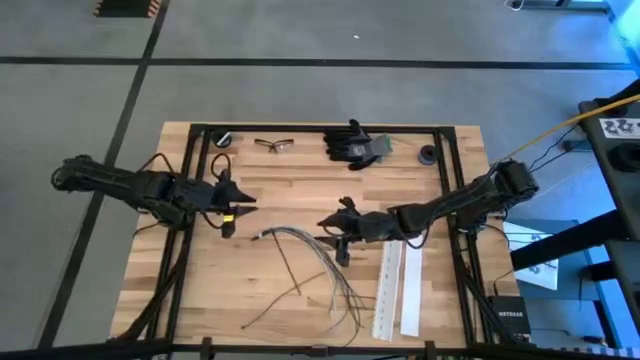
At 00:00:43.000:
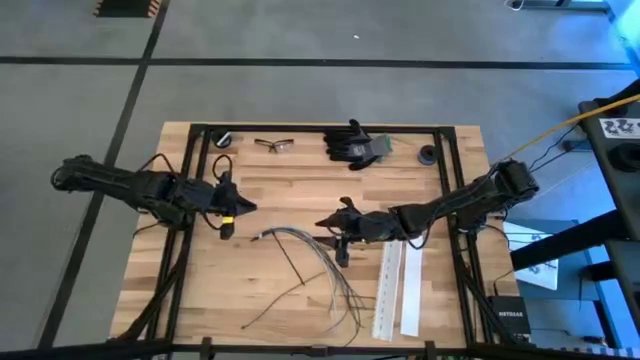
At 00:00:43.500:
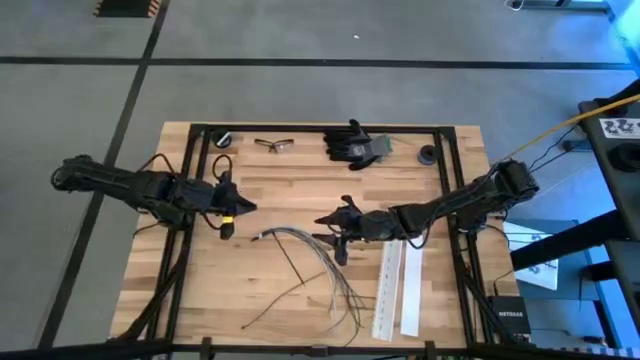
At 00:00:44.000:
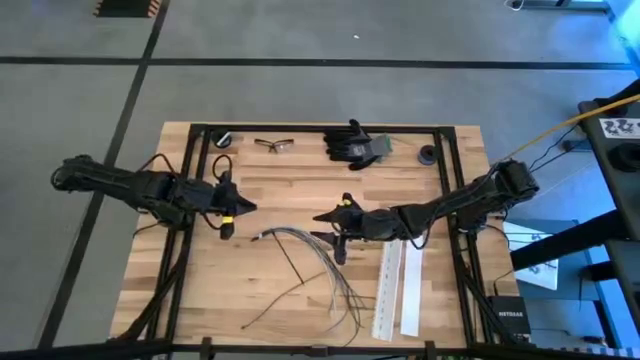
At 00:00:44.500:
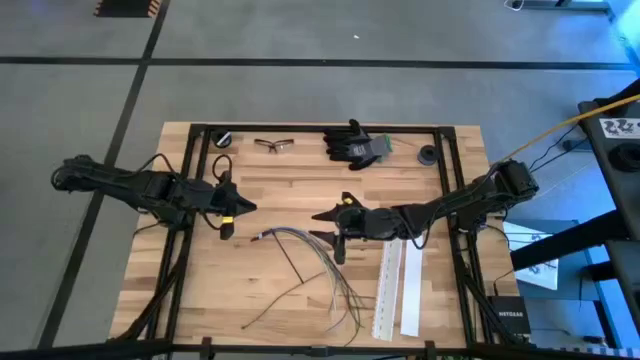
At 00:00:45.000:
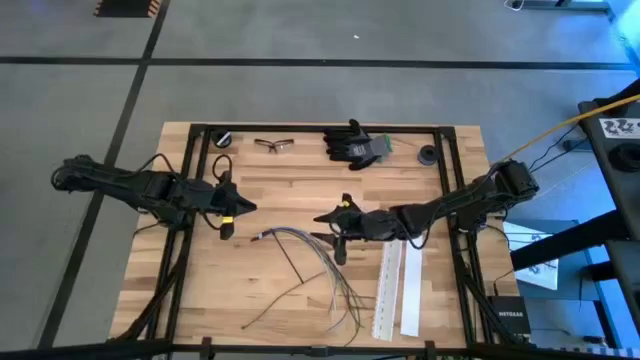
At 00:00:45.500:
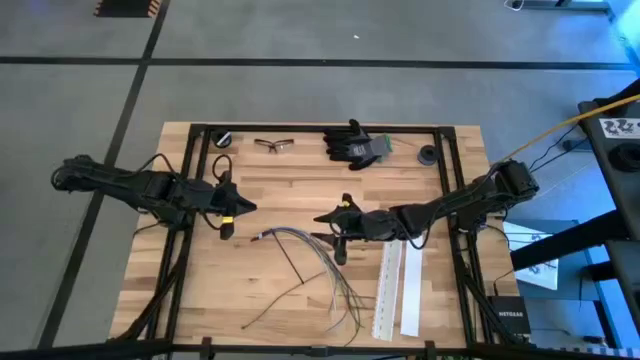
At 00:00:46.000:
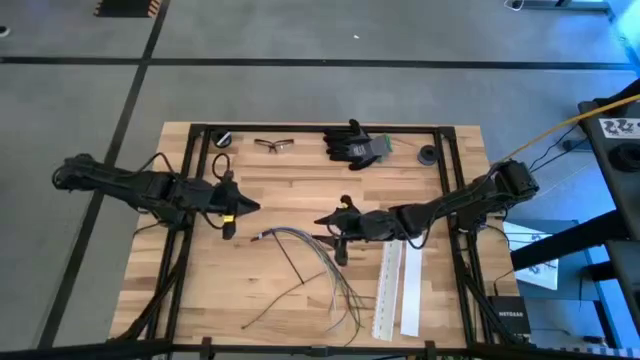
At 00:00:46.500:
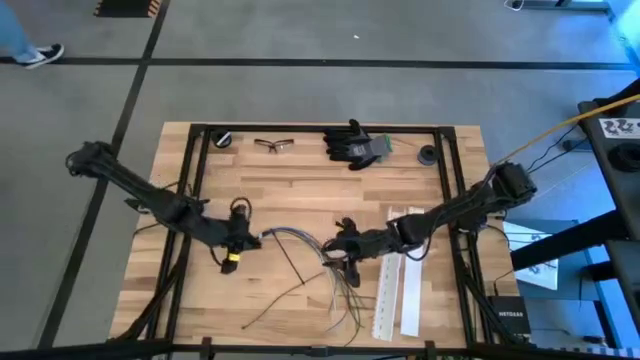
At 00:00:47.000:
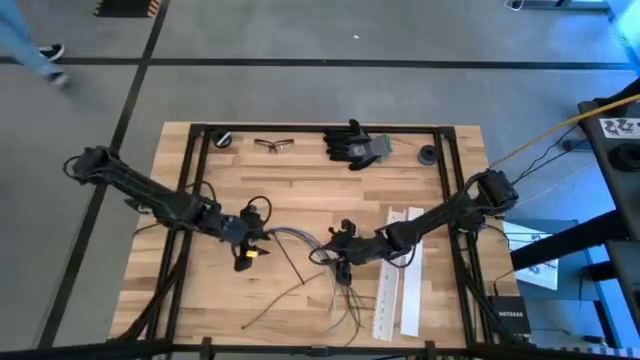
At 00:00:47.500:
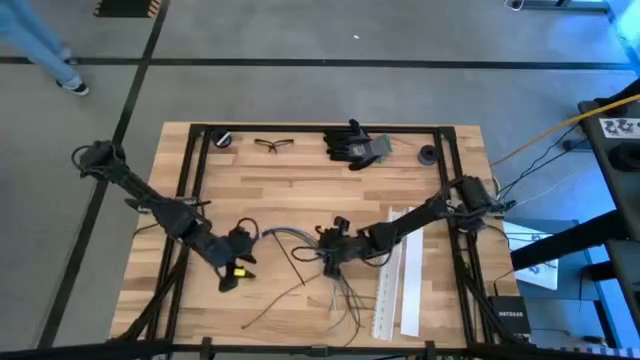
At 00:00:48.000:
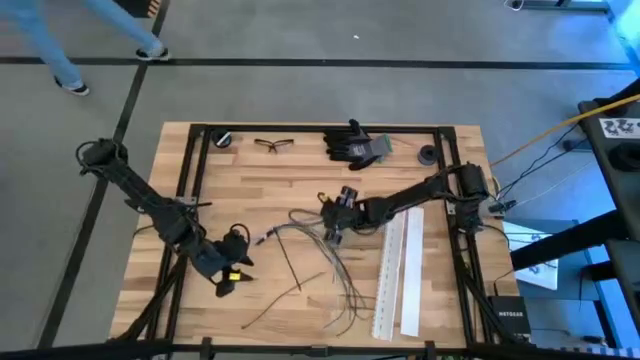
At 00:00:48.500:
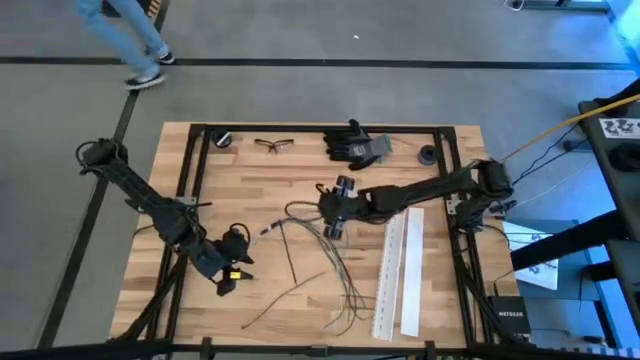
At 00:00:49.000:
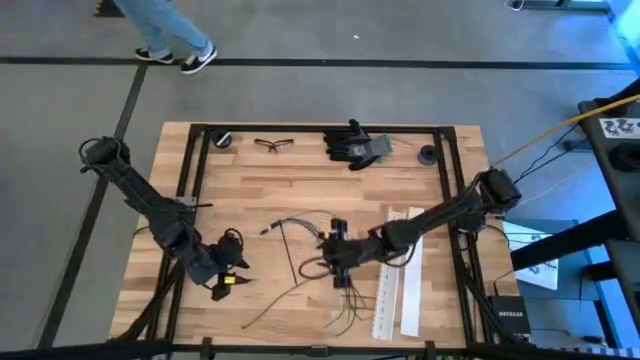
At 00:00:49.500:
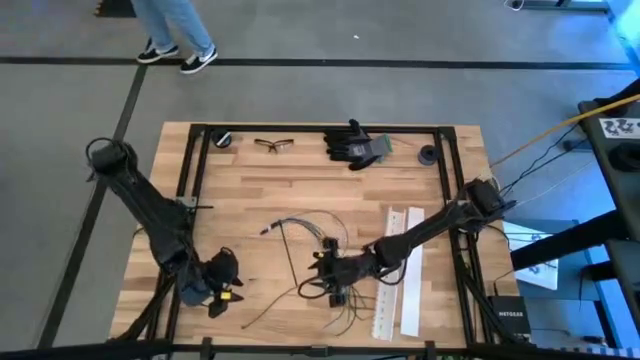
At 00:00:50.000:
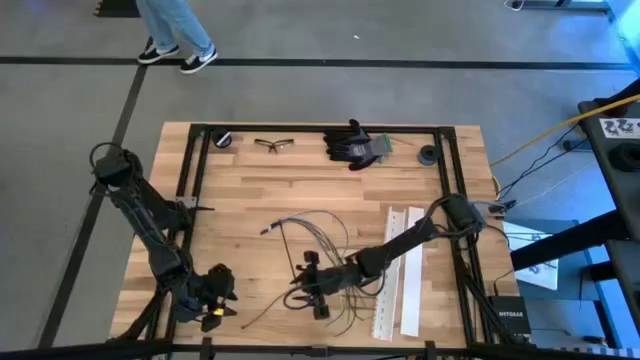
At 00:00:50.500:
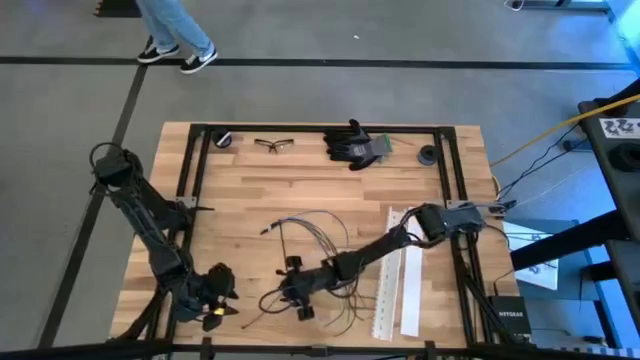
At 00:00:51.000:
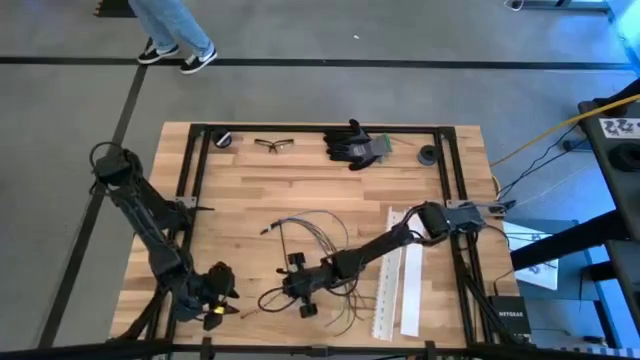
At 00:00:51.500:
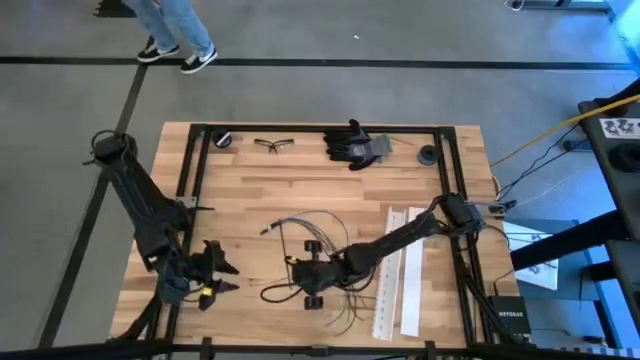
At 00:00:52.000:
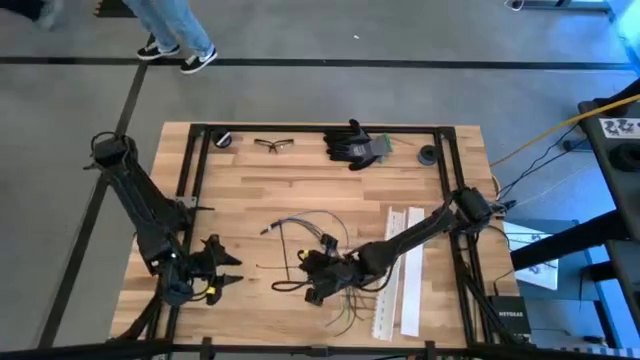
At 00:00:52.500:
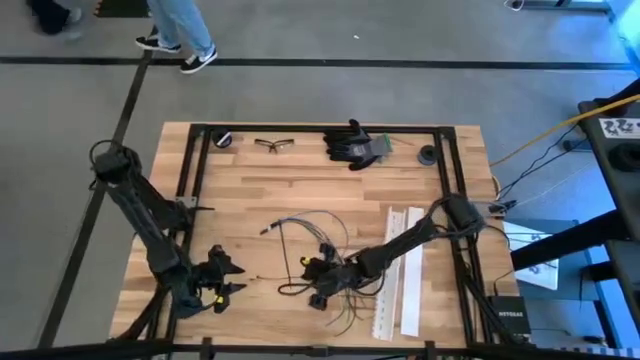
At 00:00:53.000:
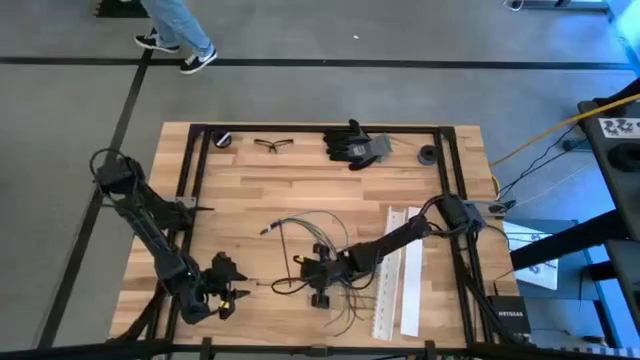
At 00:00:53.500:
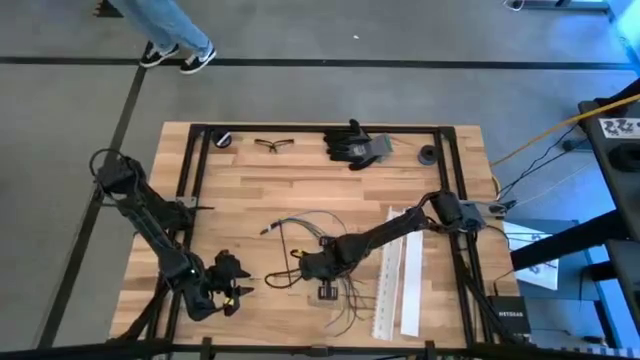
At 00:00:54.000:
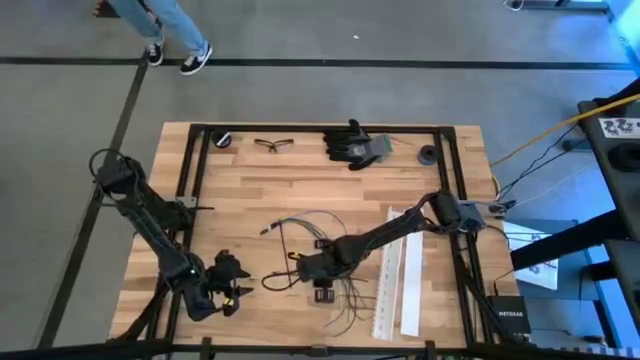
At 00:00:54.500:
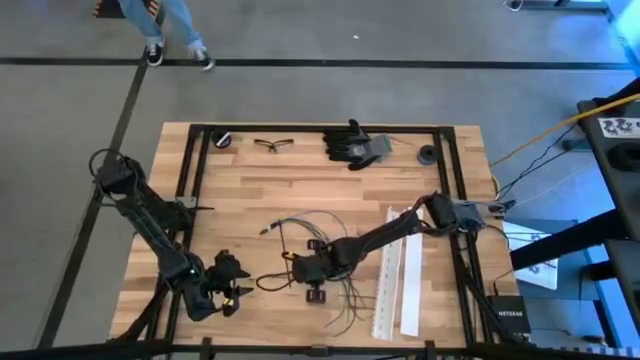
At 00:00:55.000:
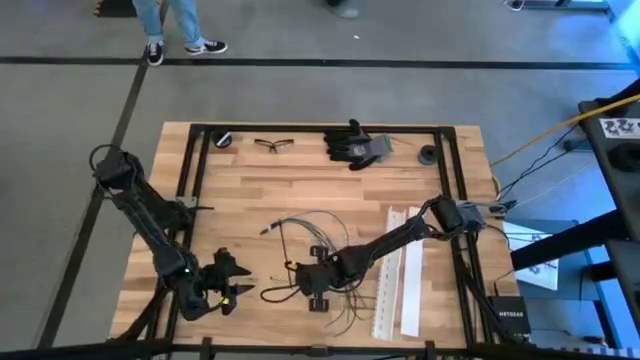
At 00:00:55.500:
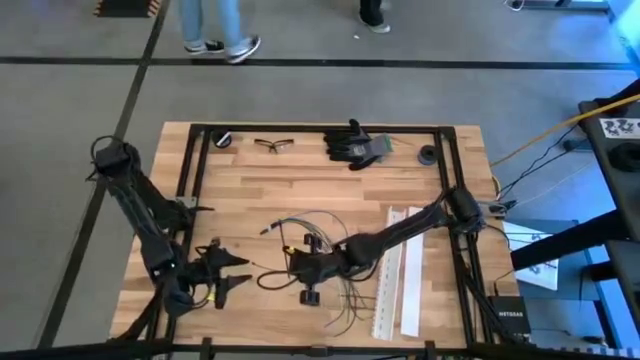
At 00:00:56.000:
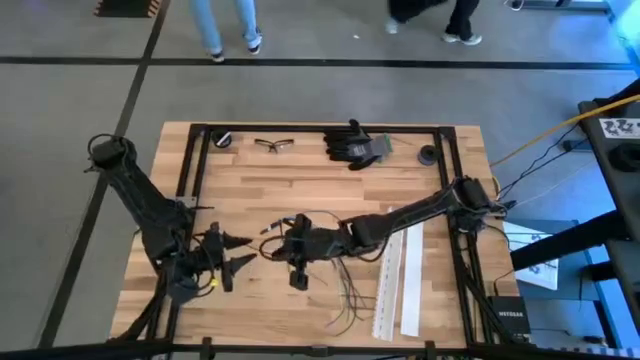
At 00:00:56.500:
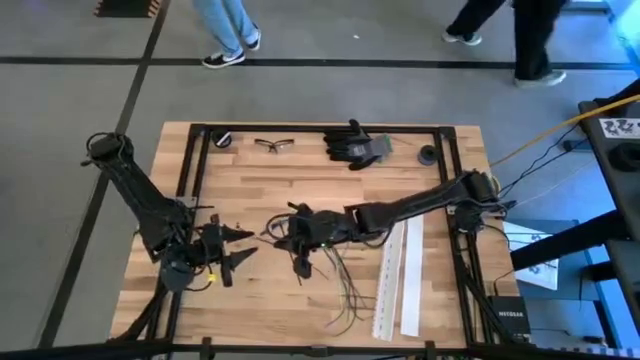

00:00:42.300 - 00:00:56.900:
Task: Ziptie cables
Wrap the zip tie on the cables

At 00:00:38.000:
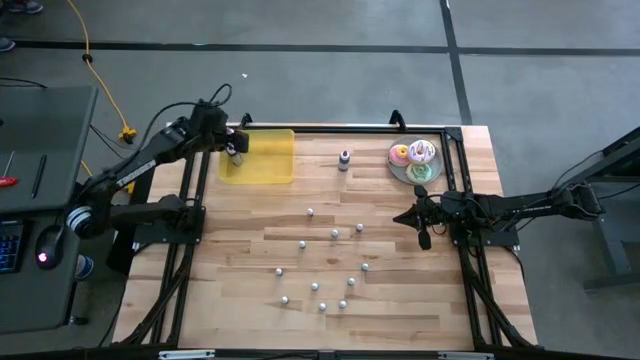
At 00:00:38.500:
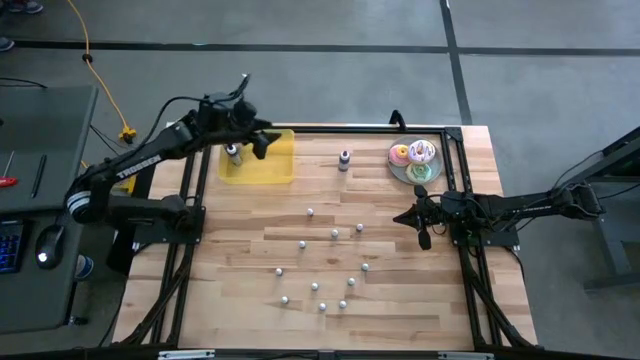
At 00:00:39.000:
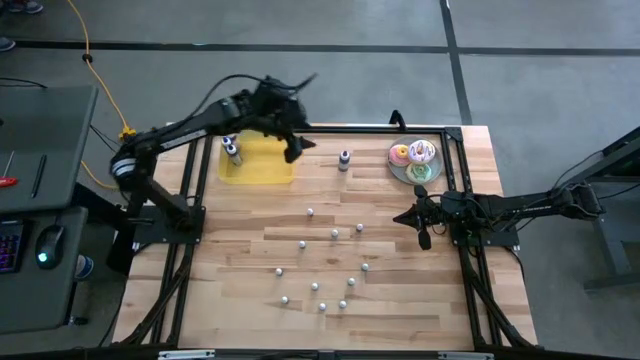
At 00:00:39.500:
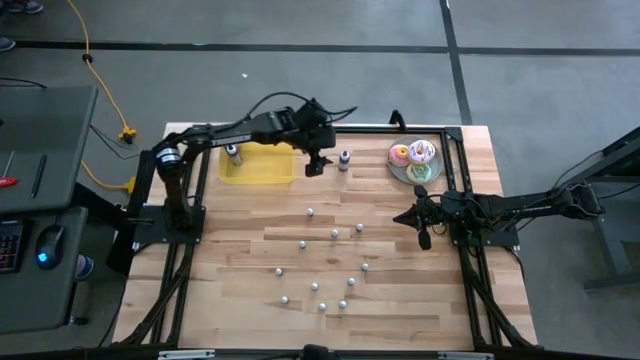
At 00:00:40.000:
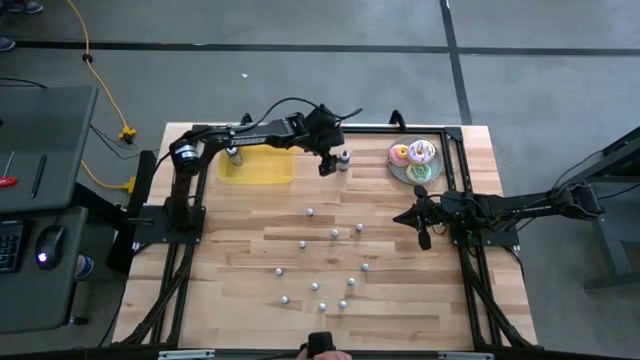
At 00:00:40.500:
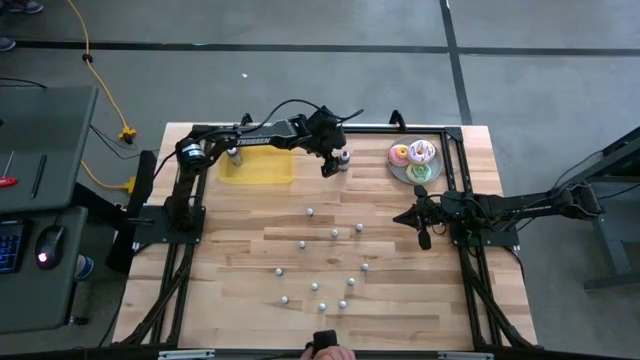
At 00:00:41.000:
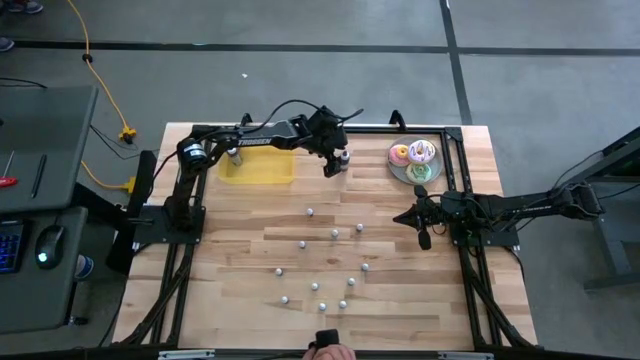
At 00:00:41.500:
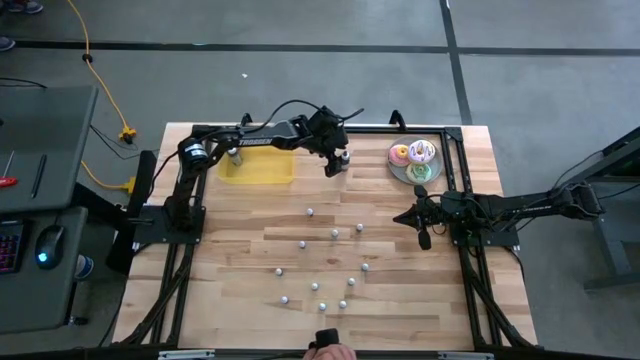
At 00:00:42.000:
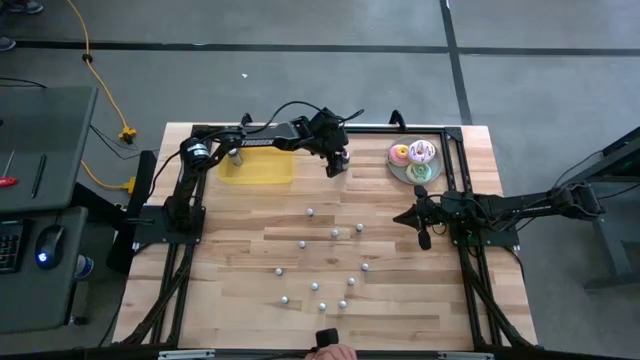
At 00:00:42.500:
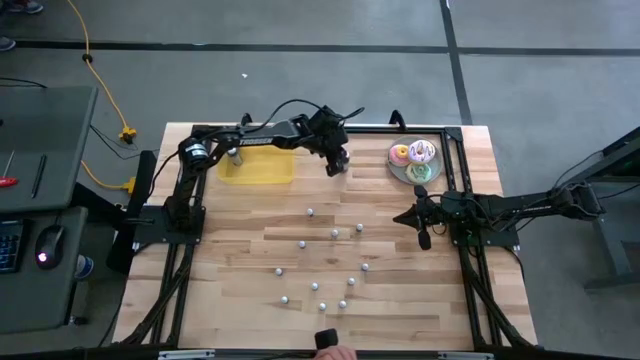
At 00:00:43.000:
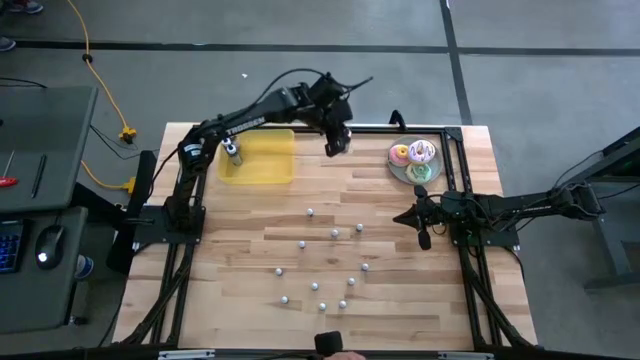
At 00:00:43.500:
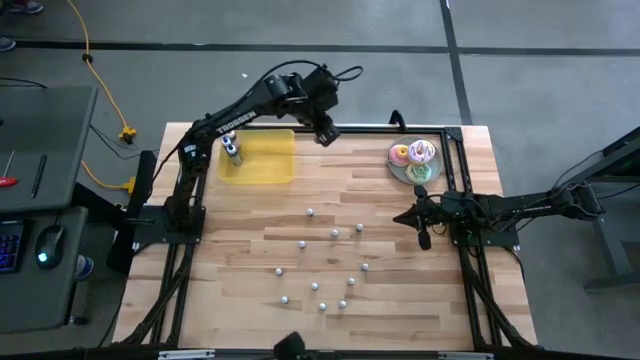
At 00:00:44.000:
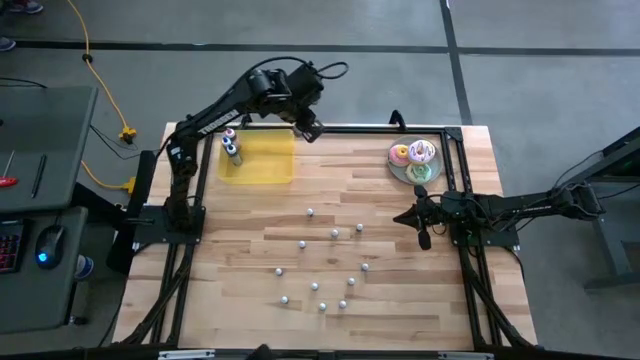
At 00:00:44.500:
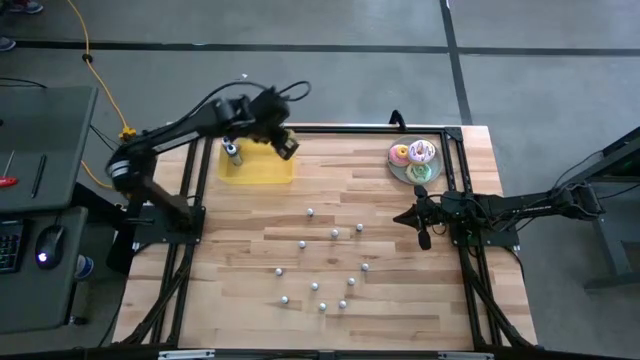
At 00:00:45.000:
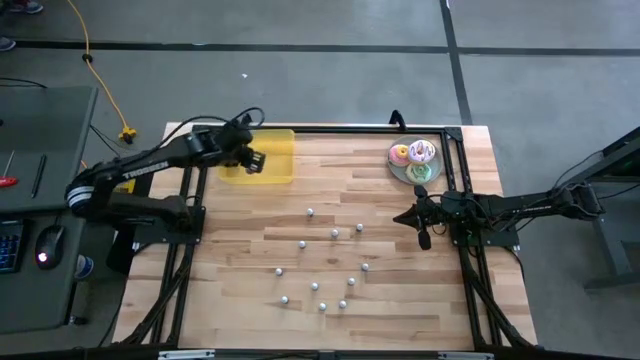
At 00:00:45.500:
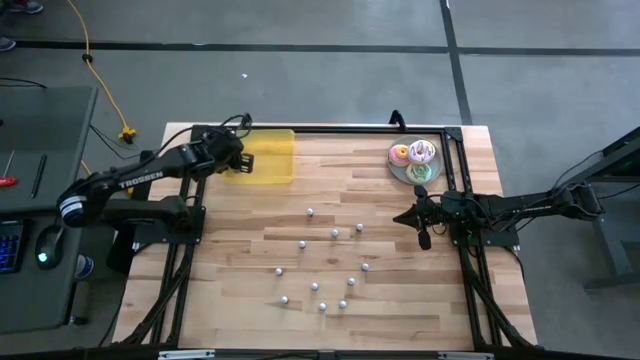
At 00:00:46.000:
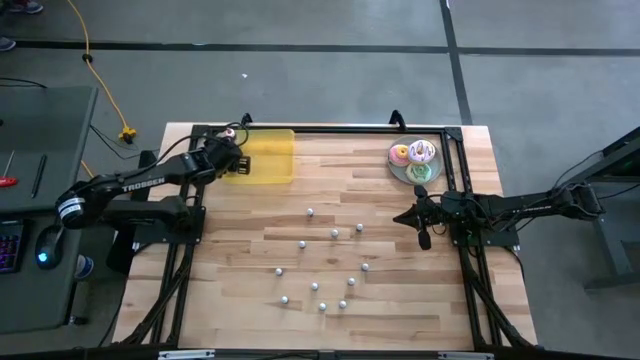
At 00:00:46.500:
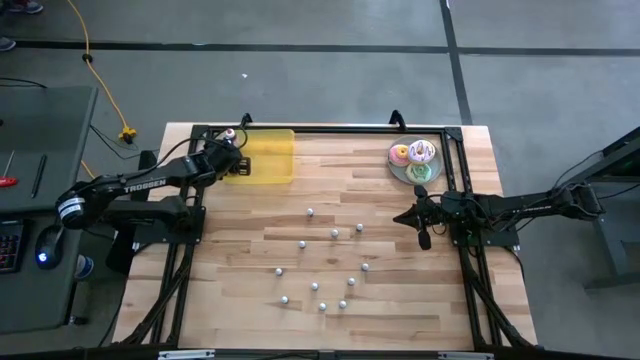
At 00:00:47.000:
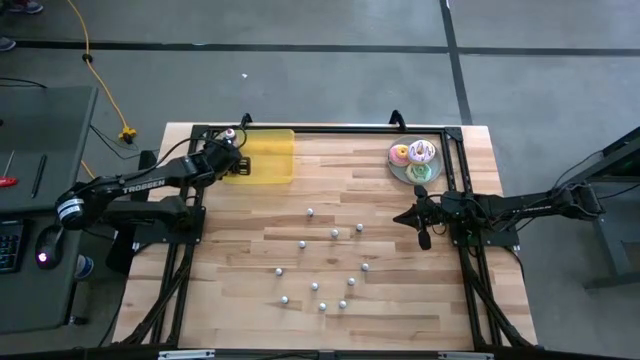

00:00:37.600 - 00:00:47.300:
Task: Pick & Place food coloring
Put the large purple food coloring bottle into the yellow bin
